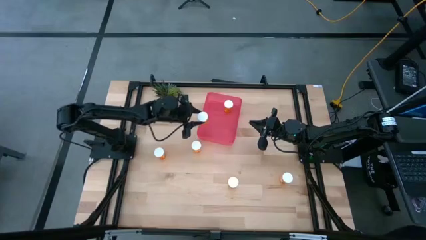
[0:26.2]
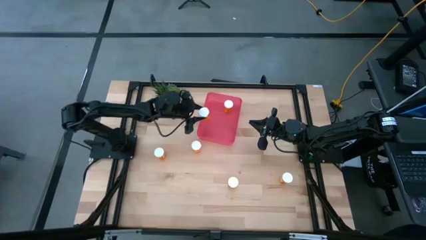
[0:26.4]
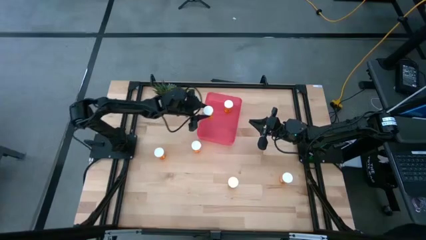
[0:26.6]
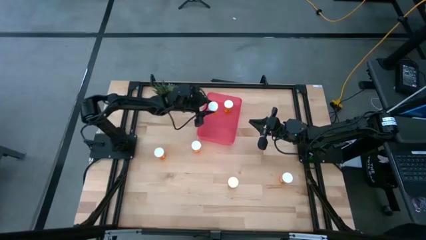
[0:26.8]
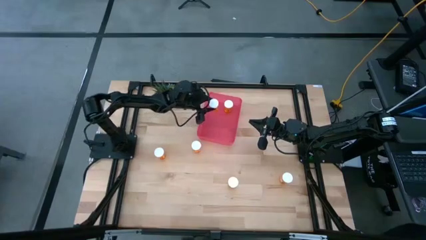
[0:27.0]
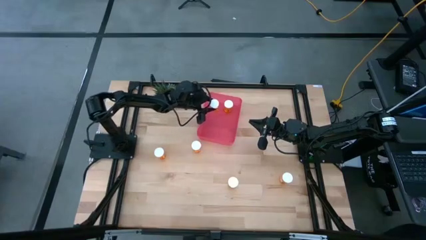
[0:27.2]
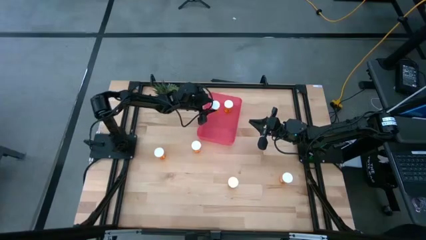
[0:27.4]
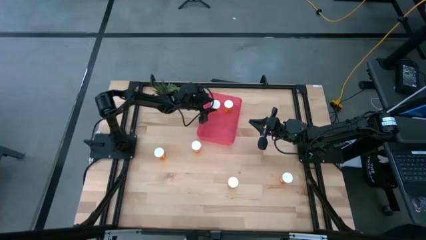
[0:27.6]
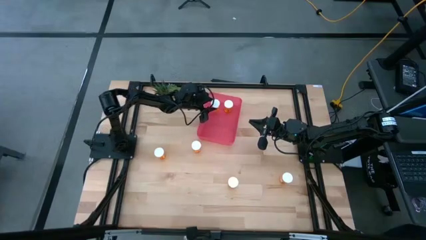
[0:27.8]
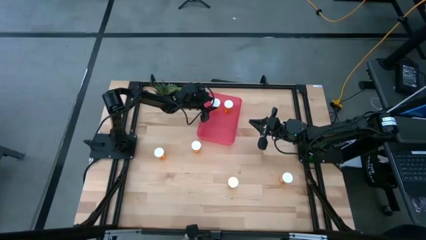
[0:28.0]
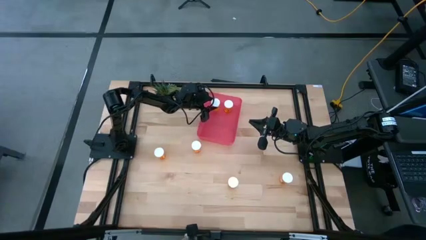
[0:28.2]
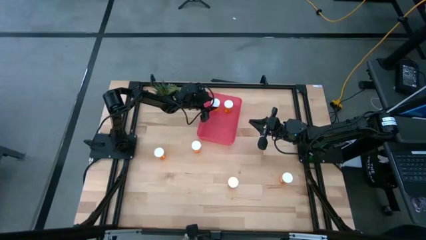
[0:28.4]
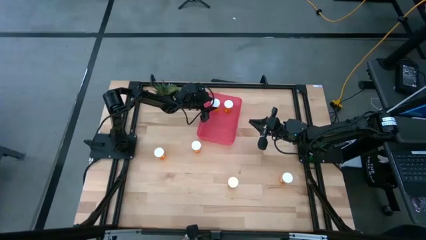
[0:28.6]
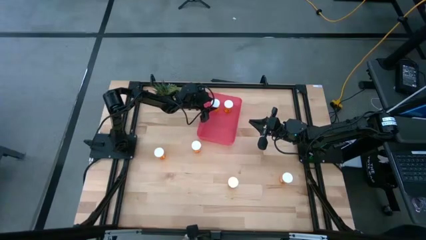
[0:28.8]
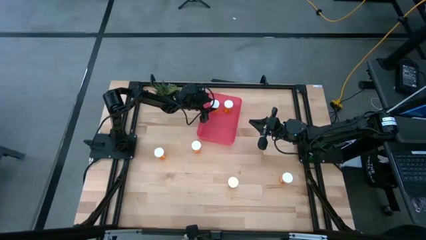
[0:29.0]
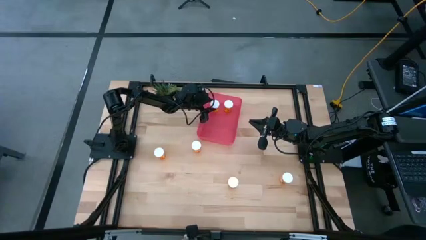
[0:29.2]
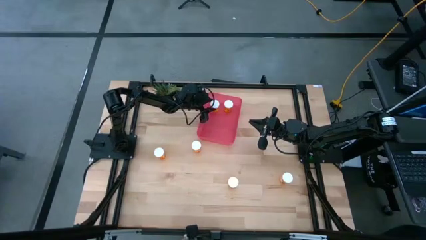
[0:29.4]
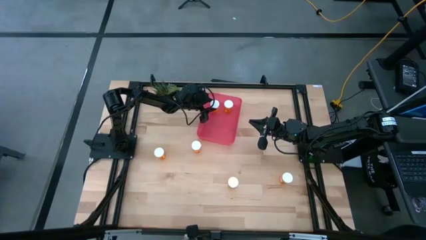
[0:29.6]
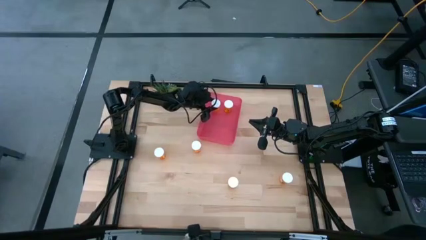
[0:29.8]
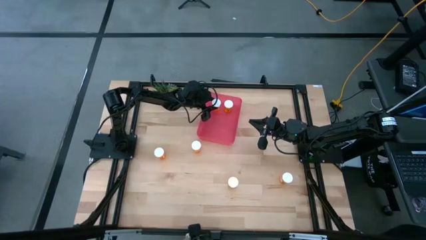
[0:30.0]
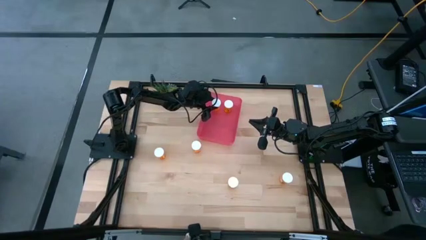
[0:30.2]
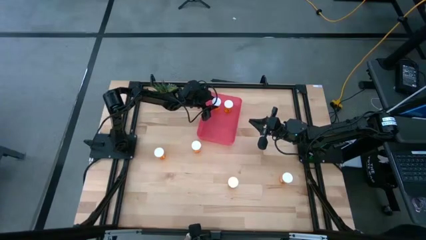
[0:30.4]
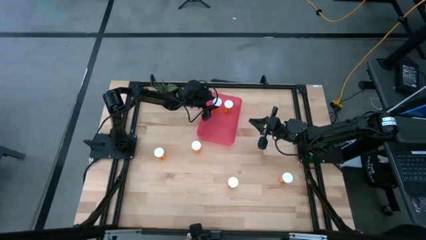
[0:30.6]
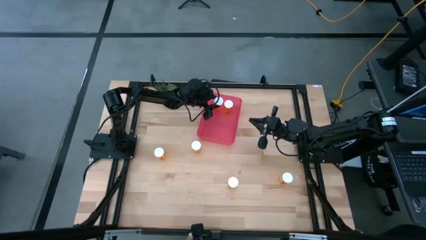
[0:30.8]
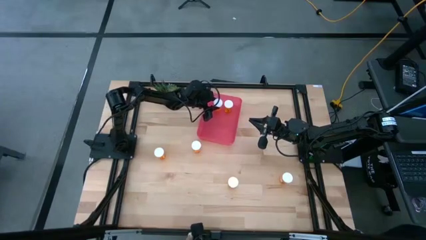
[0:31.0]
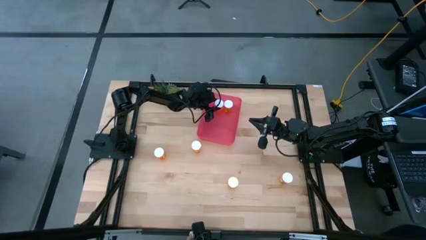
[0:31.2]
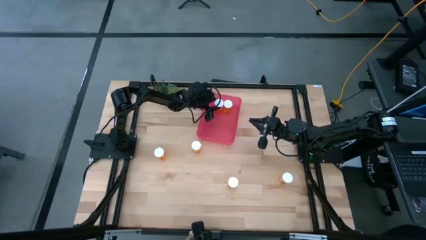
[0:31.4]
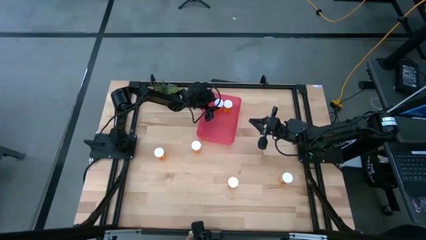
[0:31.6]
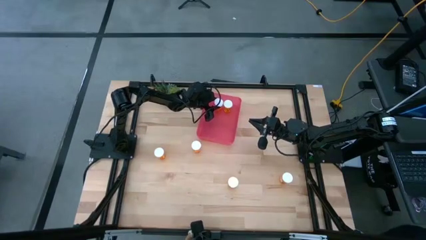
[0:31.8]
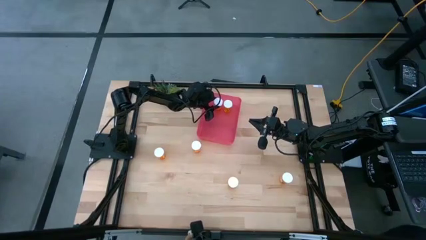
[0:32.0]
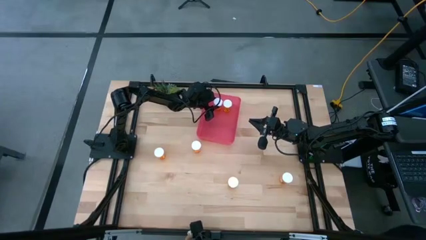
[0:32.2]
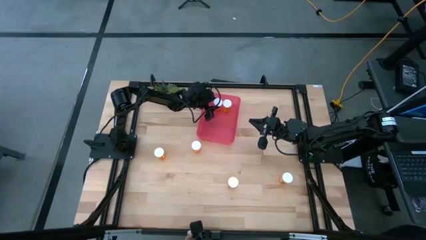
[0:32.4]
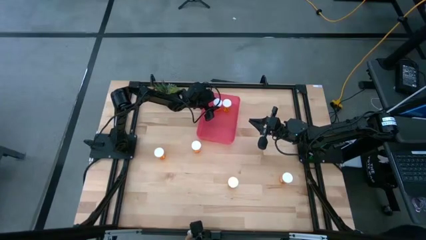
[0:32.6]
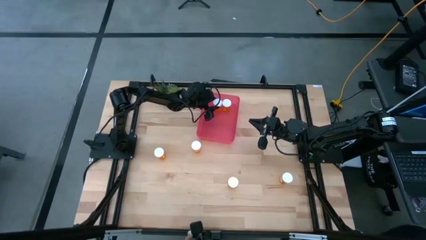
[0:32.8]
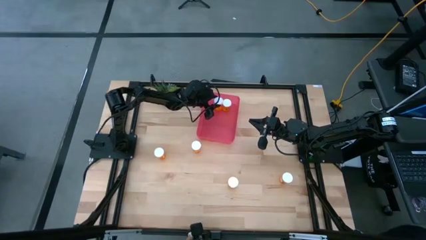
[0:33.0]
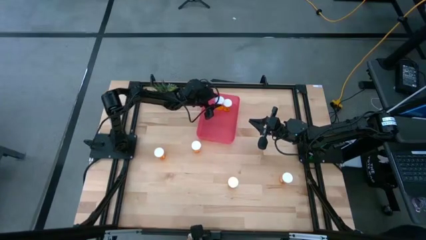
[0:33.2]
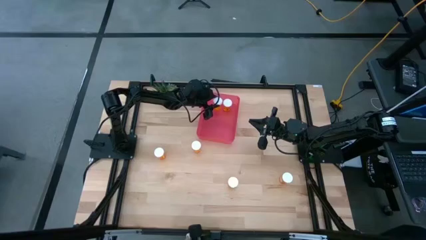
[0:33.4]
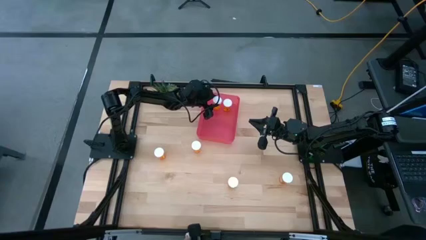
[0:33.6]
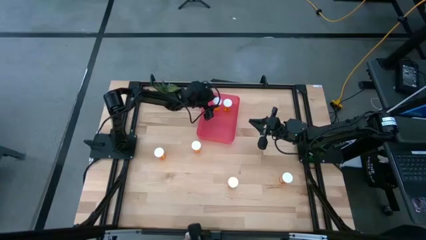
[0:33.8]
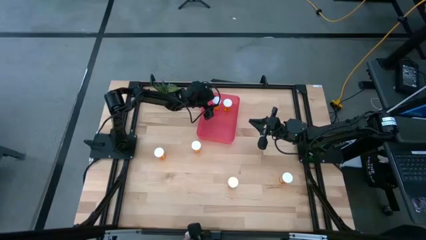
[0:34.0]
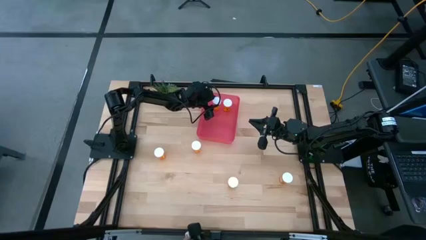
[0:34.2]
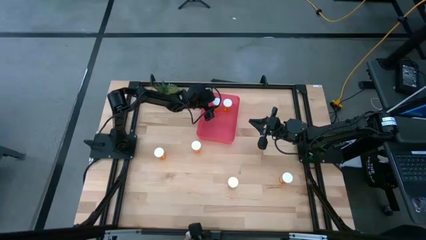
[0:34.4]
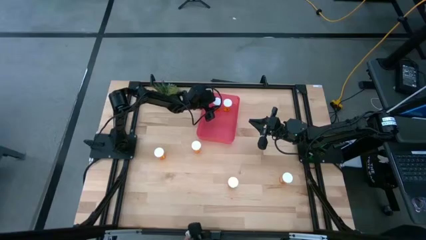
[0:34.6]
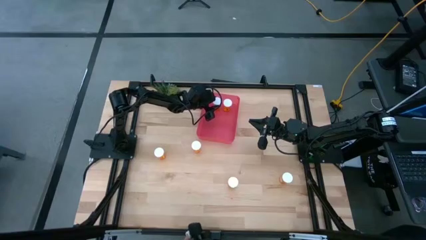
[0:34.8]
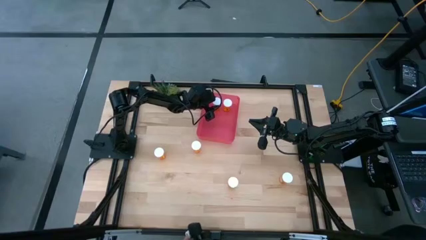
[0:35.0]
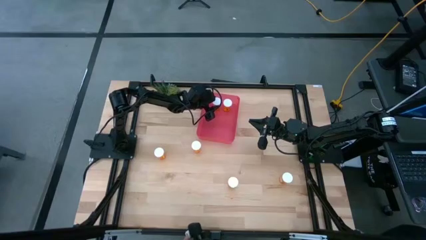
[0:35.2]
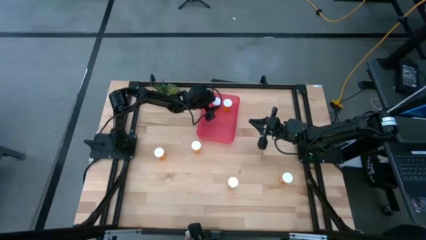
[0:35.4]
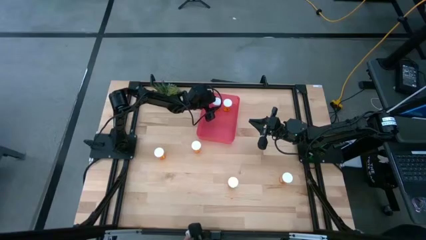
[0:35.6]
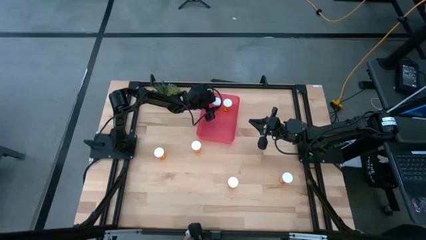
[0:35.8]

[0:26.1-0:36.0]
Task: Pick and place pill bottles into a basket
Put the orange pill bottle into the red bin

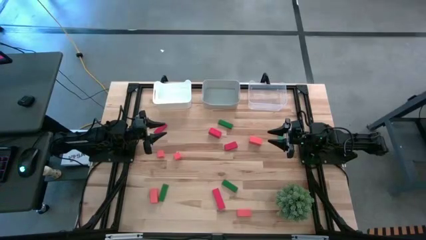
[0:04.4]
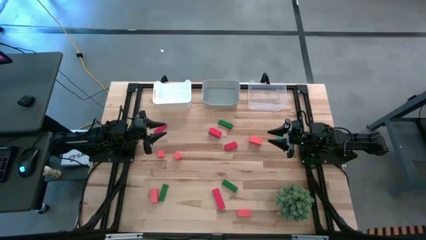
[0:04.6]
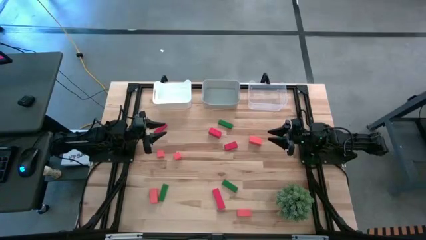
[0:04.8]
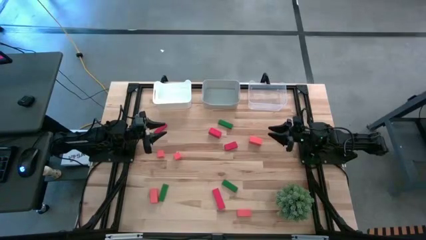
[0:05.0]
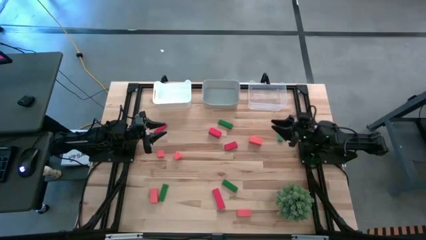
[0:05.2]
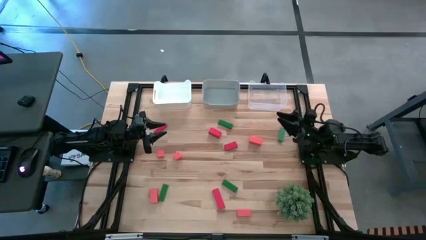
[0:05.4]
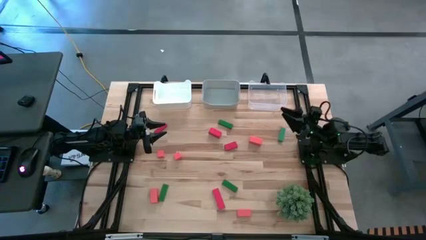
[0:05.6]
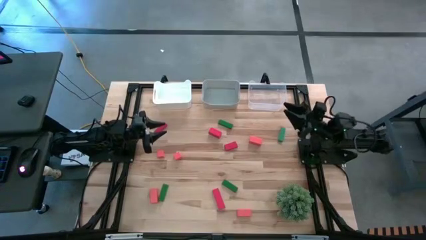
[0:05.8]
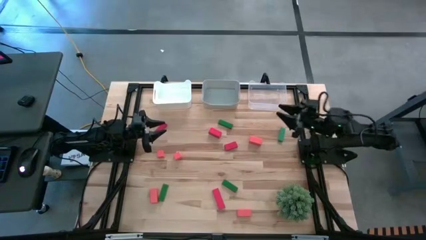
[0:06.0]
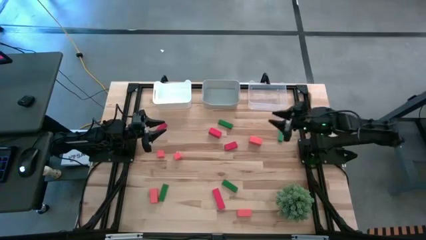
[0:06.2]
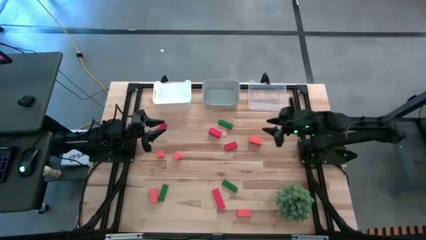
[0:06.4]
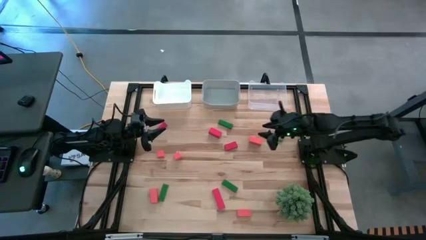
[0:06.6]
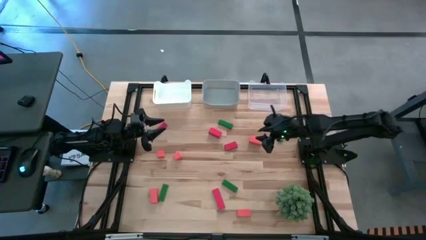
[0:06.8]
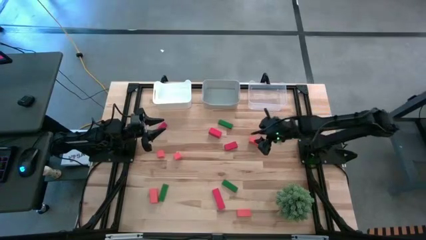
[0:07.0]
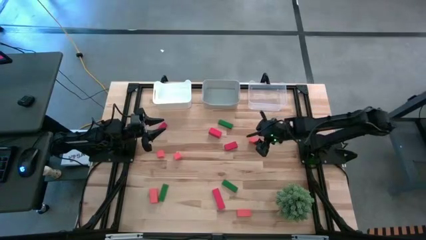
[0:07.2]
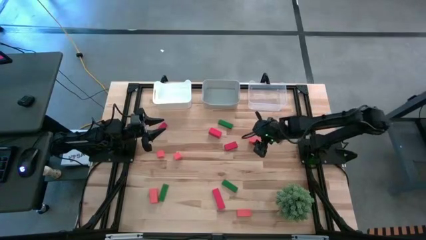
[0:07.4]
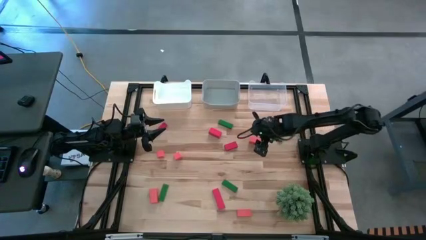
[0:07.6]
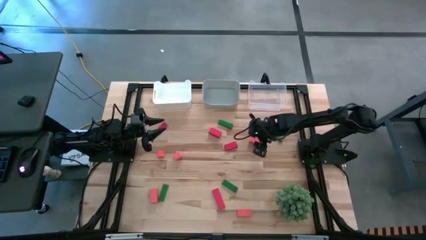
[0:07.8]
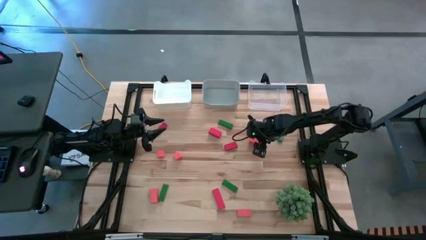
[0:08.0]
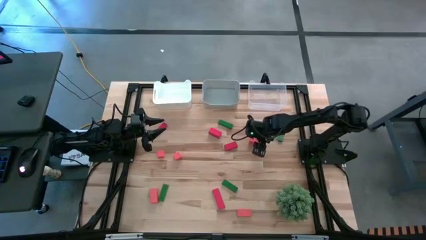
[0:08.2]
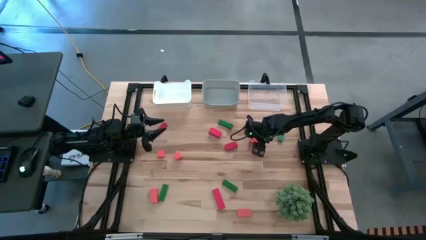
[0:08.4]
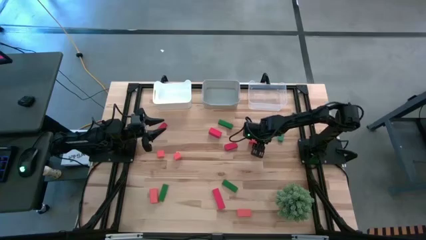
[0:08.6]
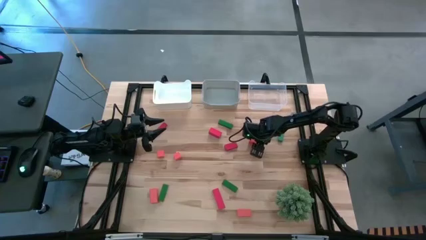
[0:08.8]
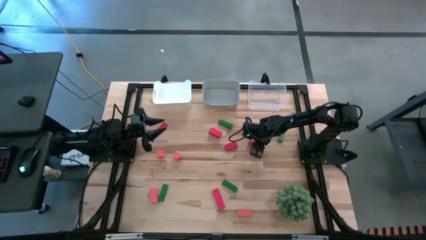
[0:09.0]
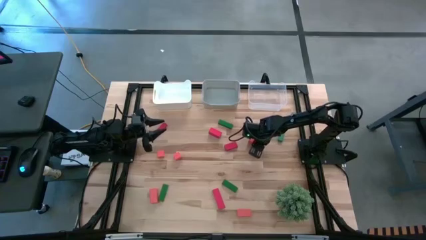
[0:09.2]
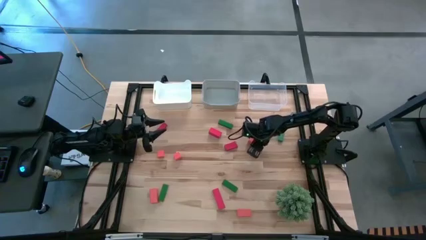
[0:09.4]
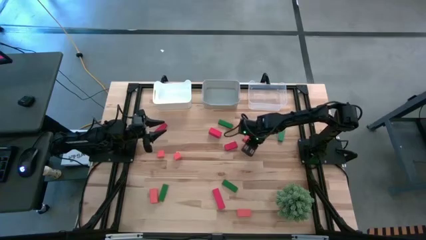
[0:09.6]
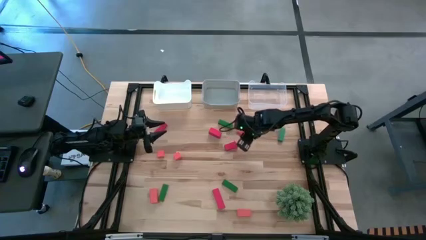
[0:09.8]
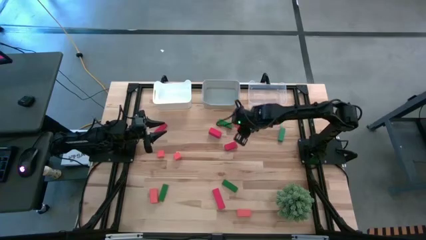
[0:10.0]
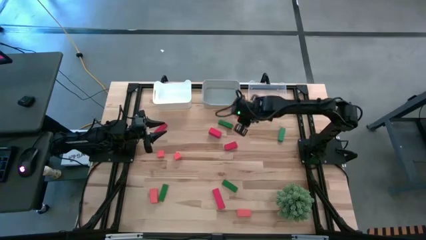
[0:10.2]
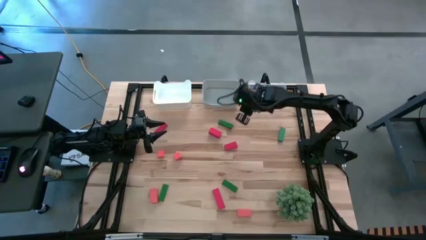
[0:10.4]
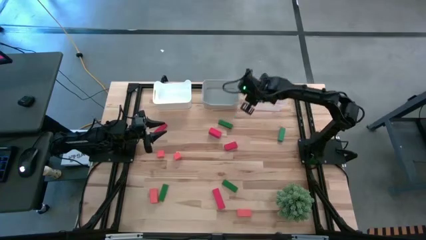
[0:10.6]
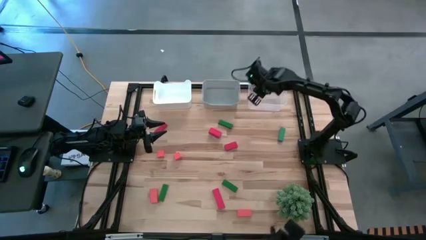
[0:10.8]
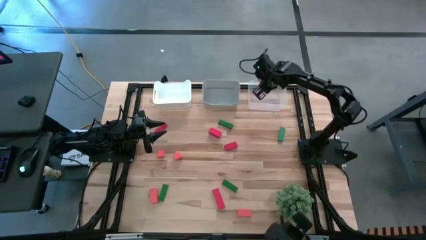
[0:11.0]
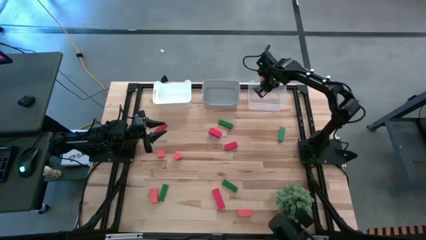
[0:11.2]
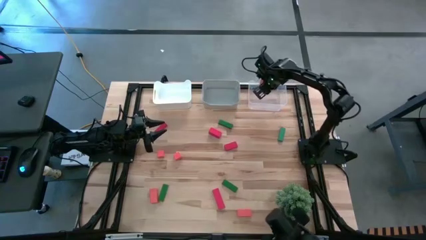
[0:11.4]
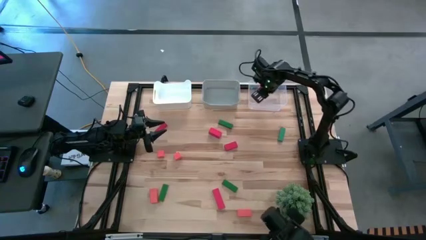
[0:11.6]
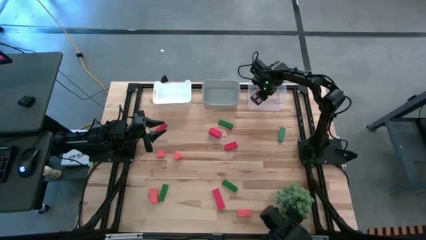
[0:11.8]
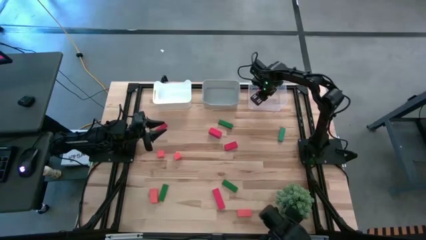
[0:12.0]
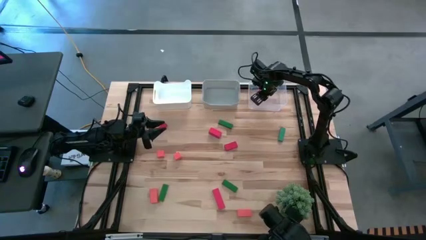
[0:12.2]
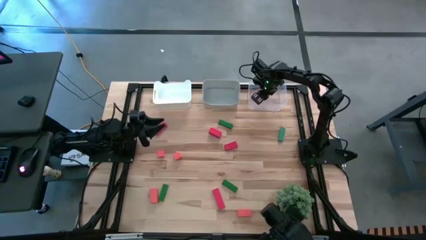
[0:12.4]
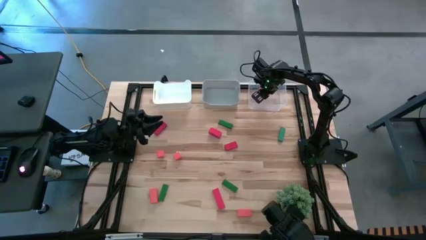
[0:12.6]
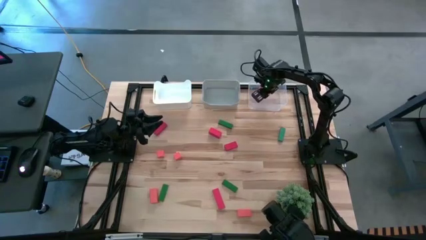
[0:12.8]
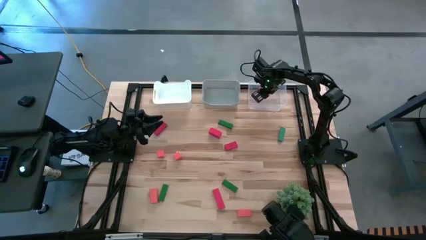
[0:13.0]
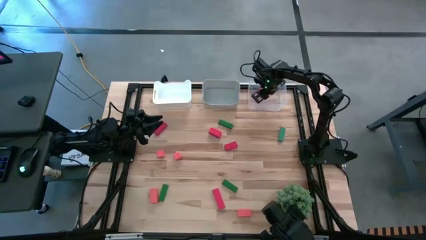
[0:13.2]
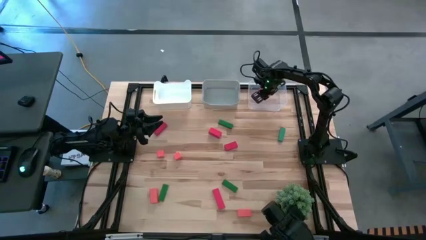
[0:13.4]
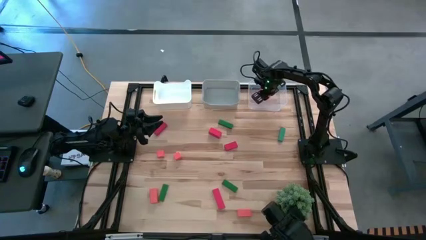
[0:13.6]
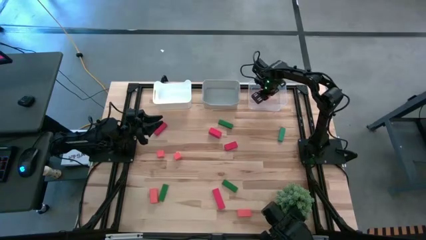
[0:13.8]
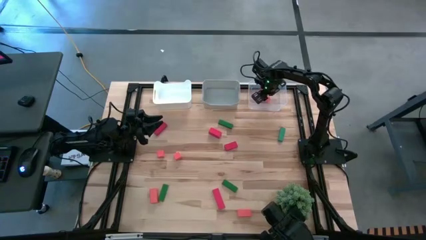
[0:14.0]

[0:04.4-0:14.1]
Task: Sort & place blocks by color
Put the top right orange block into the transparent bin
